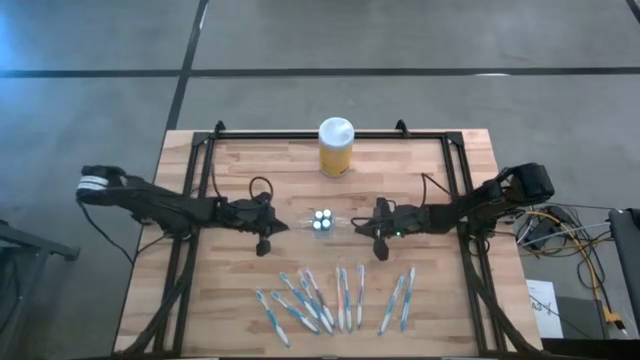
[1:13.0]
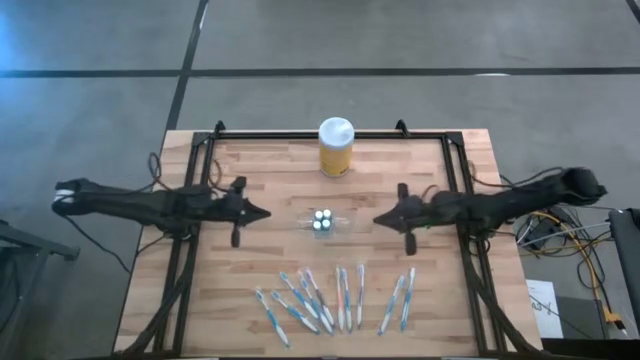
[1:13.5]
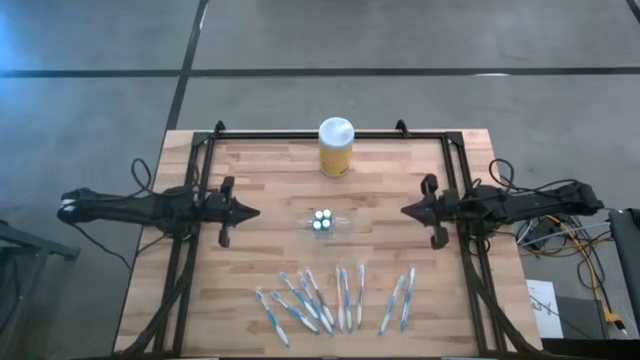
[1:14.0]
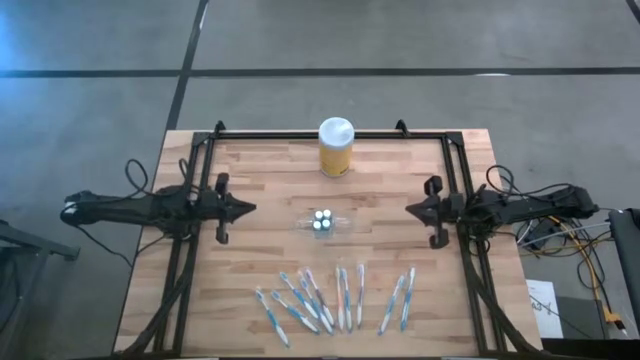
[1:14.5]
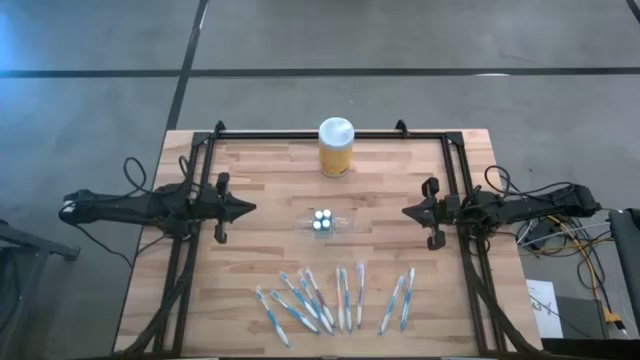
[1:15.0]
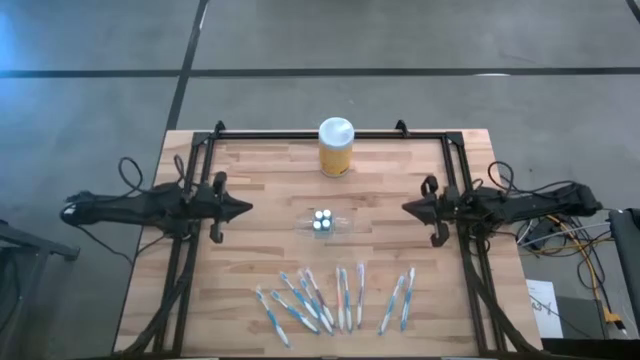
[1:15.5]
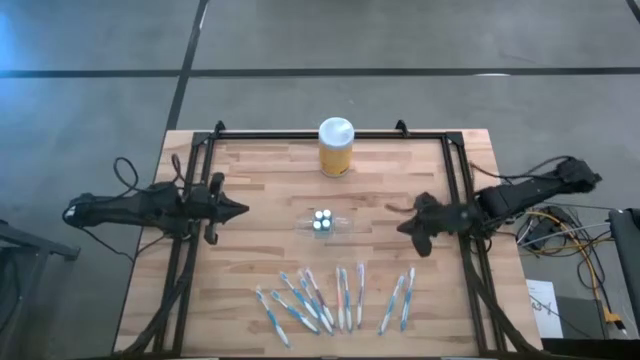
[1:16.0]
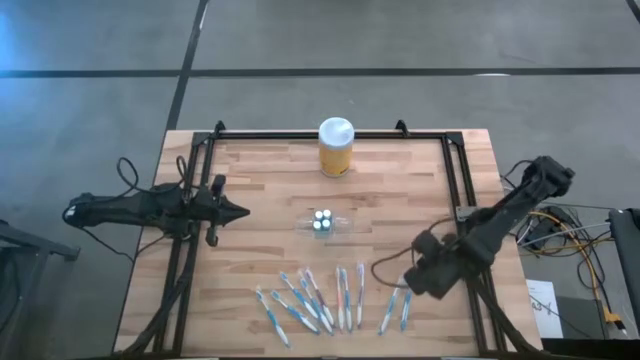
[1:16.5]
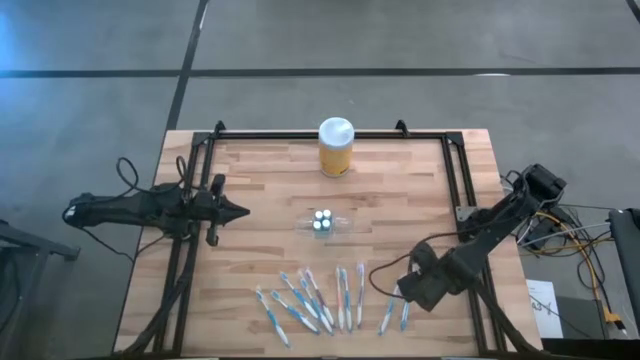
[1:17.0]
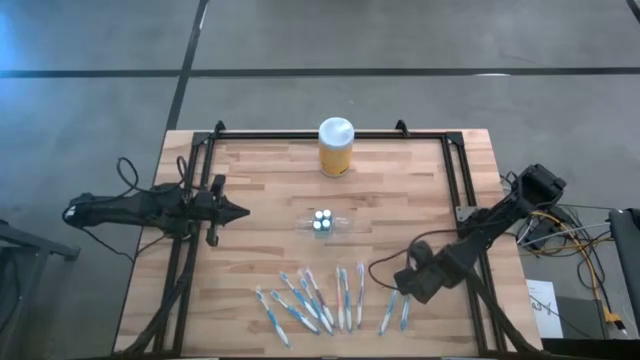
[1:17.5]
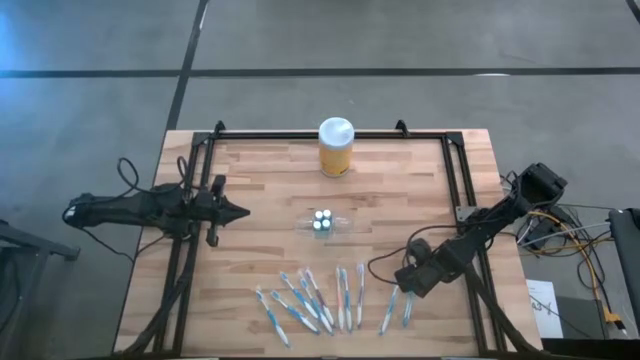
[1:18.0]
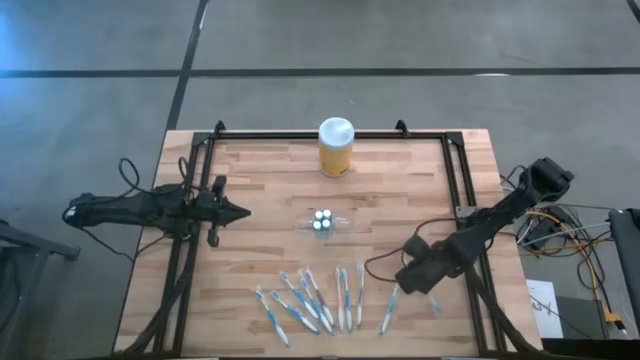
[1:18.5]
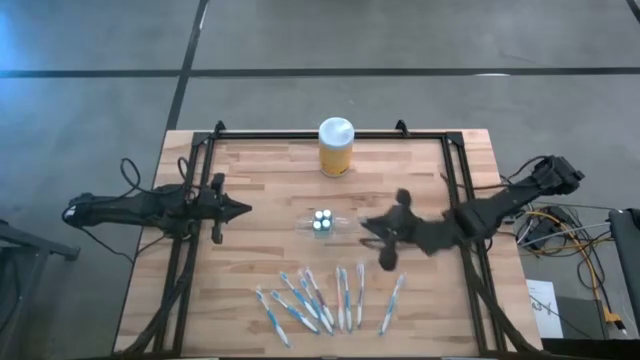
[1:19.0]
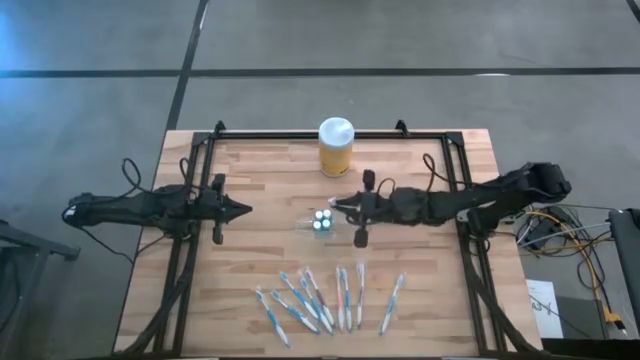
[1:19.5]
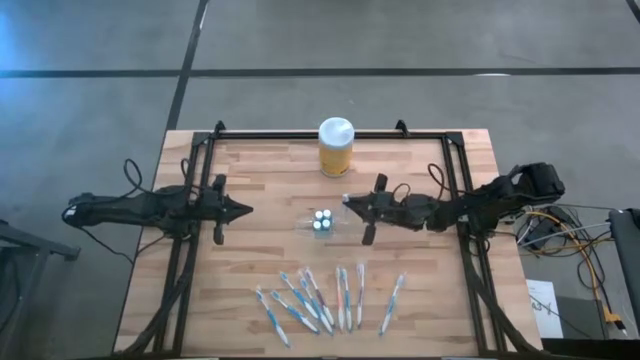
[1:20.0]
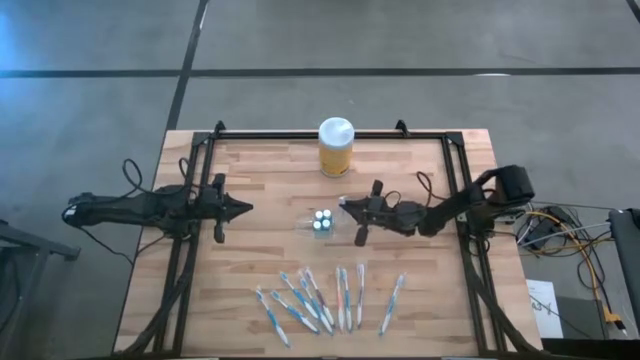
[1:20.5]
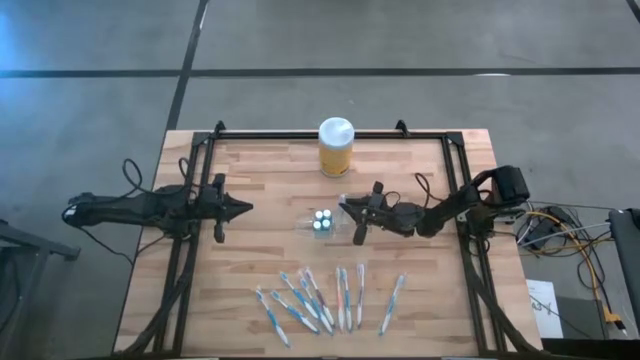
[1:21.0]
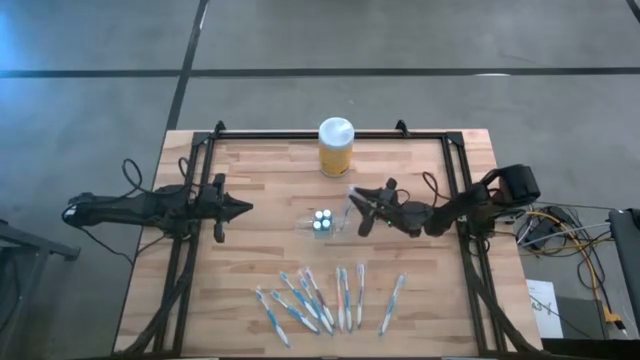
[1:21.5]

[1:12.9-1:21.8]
Task: Pick & Place toothbrushing station
Put the blue toothbrush into the transparent organizer

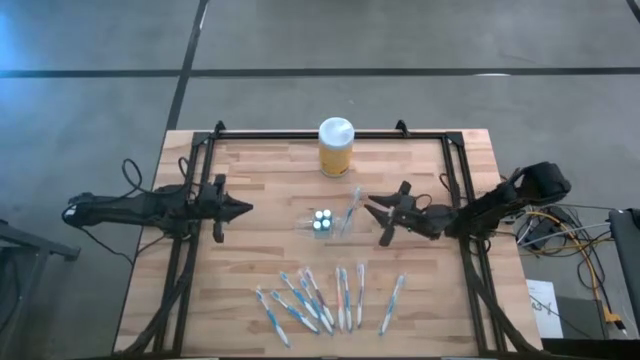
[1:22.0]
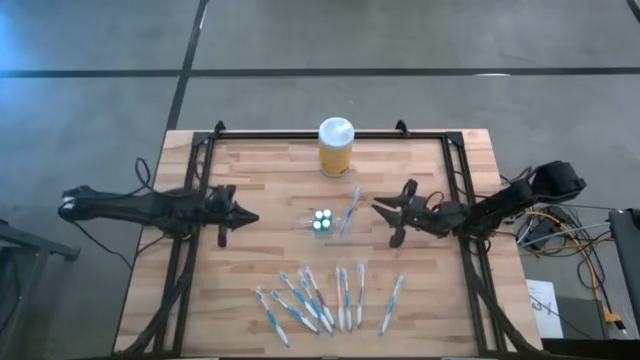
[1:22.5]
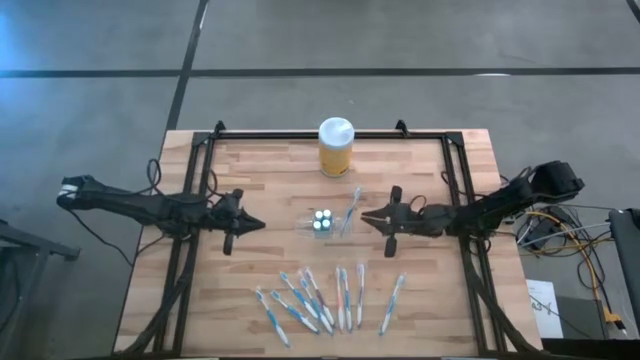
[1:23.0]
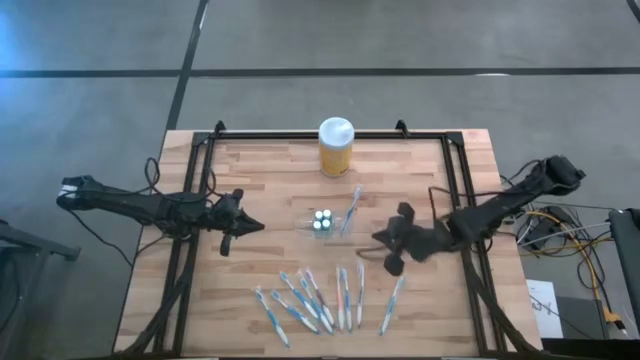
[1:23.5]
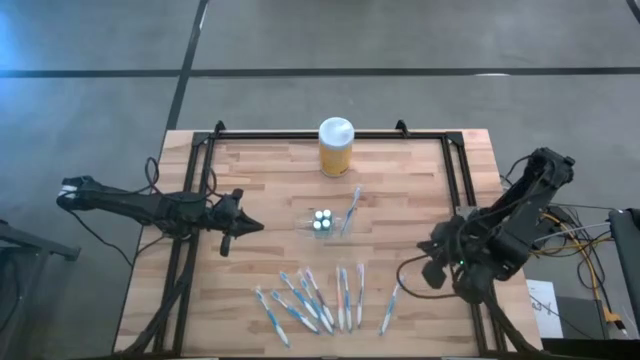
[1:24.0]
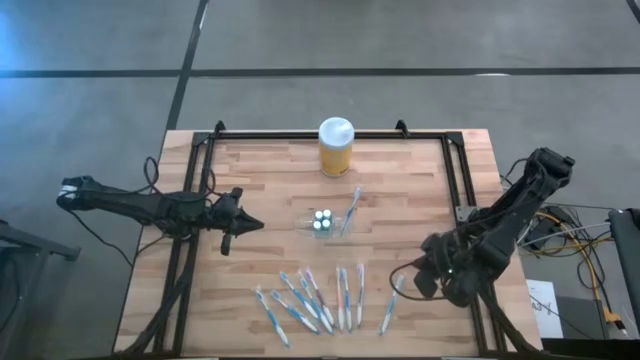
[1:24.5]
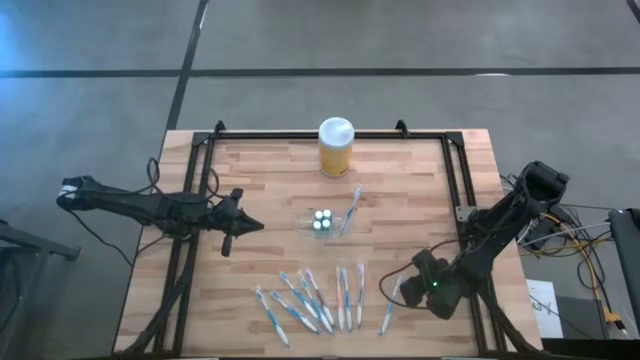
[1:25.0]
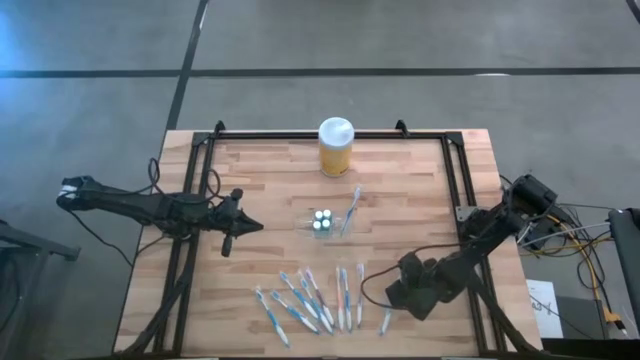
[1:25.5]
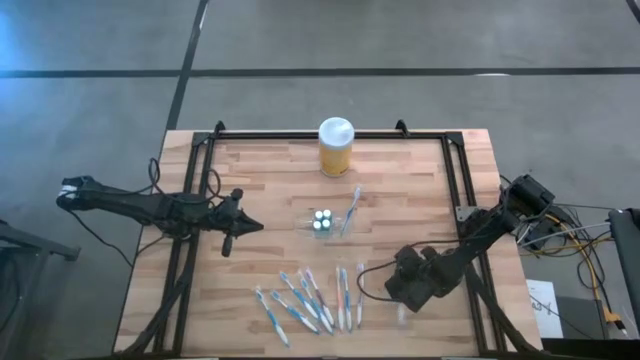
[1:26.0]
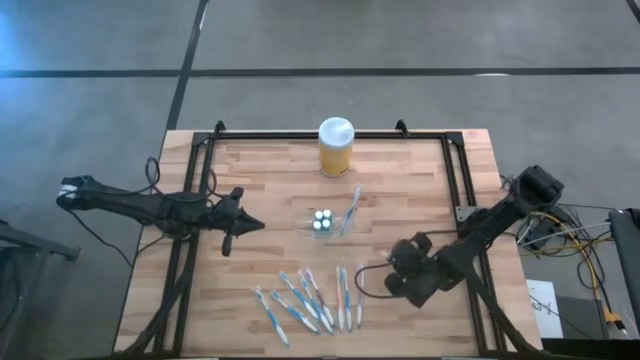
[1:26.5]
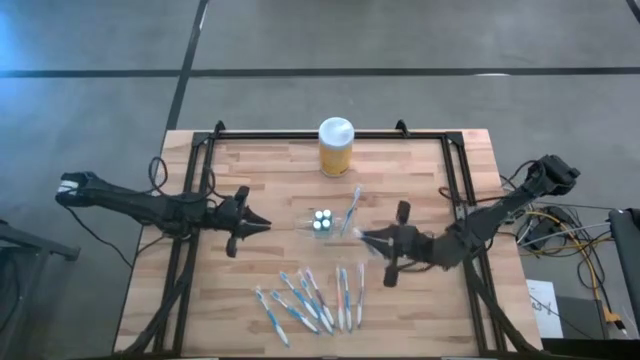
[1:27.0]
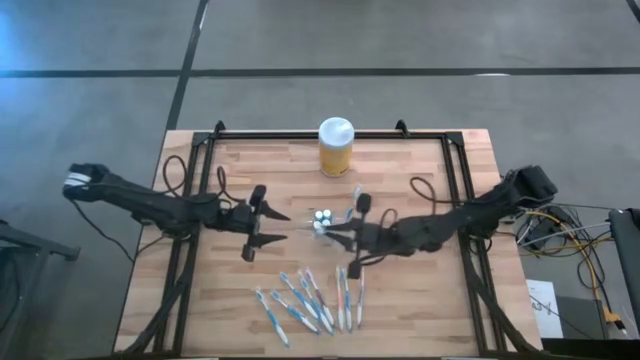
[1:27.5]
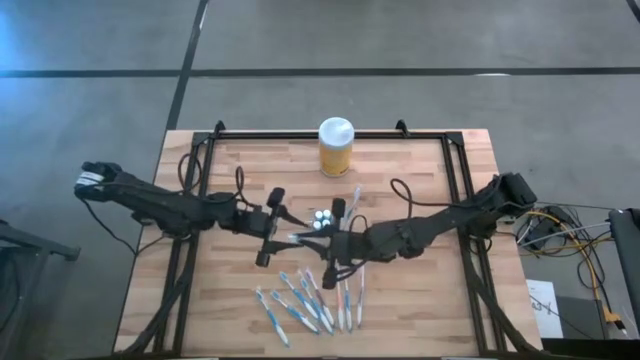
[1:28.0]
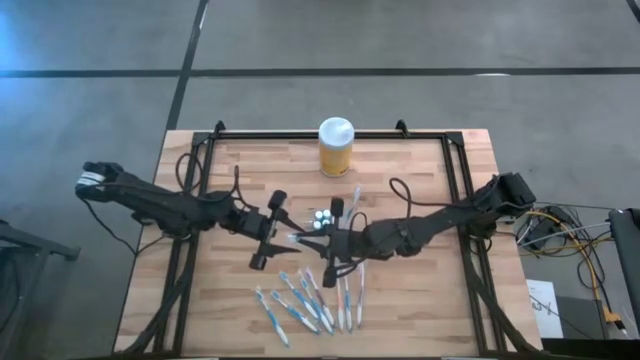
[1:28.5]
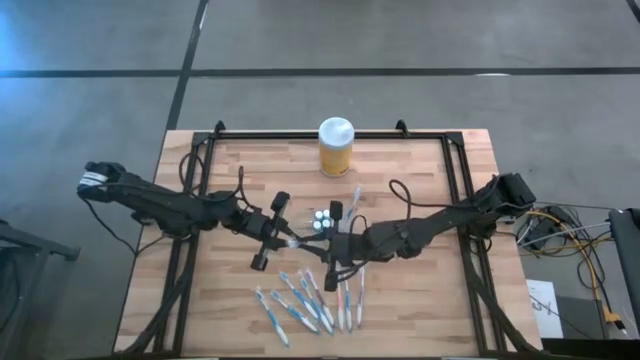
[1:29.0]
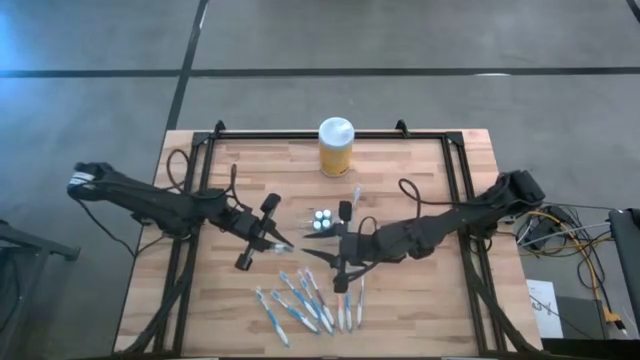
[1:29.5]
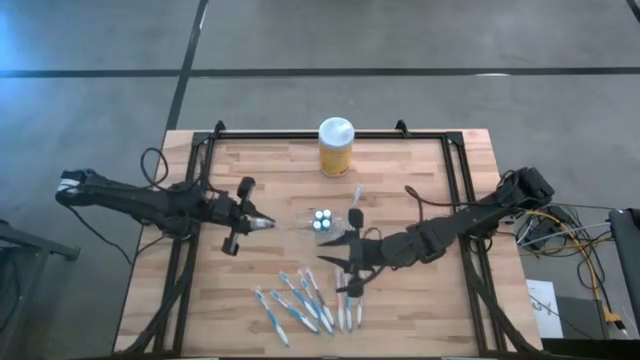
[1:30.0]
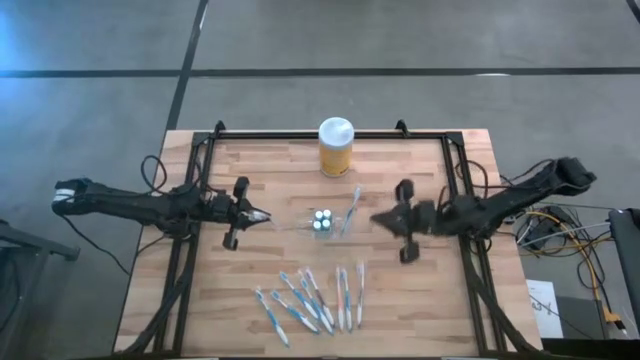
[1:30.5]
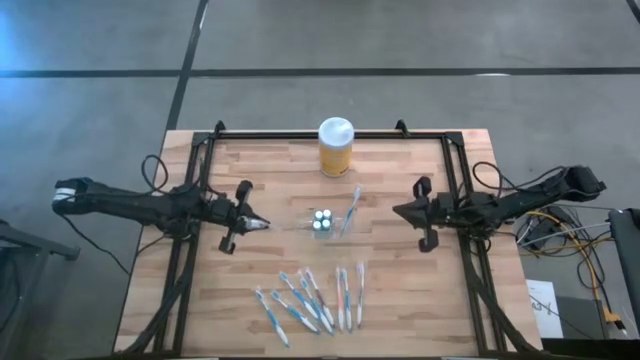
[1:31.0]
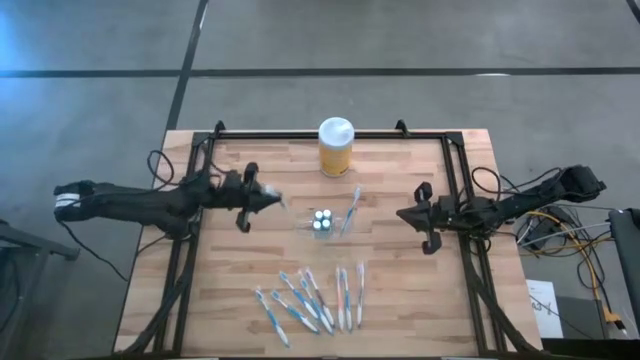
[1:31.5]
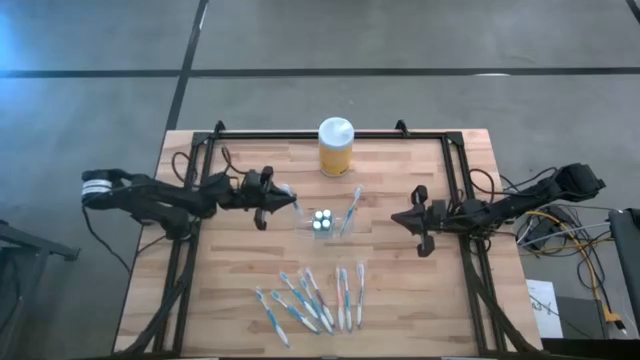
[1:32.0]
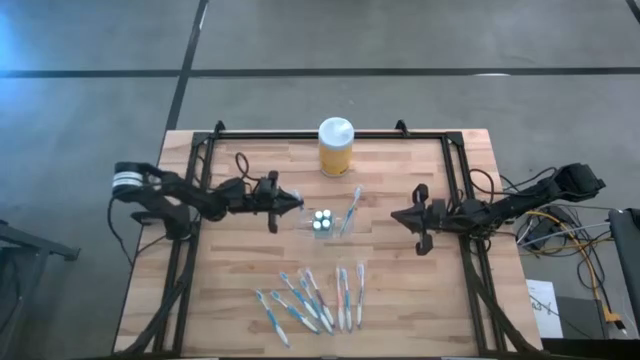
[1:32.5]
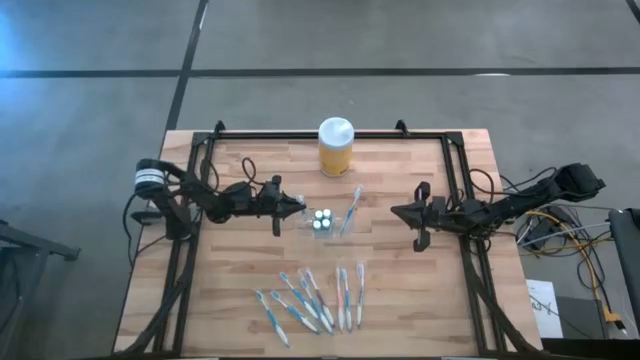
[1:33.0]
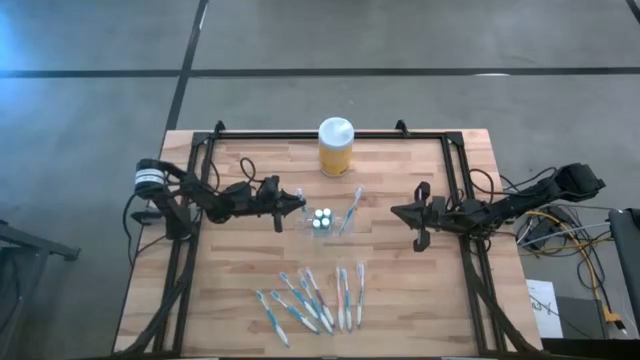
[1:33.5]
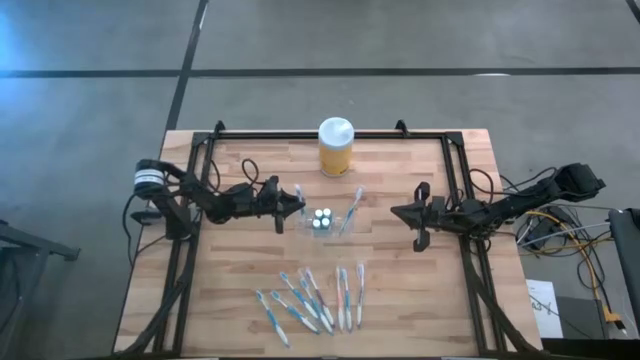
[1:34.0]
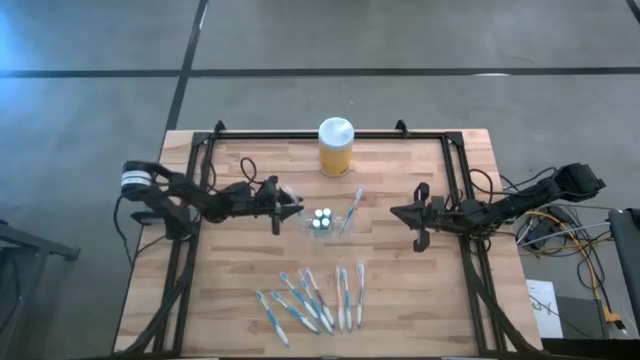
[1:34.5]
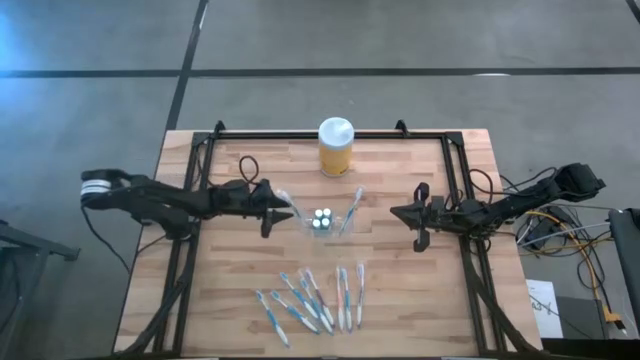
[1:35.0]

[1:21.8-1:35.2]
Put the blue toothbrush into the transparent organizer

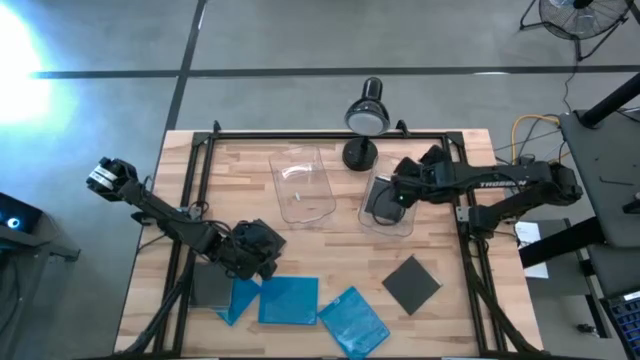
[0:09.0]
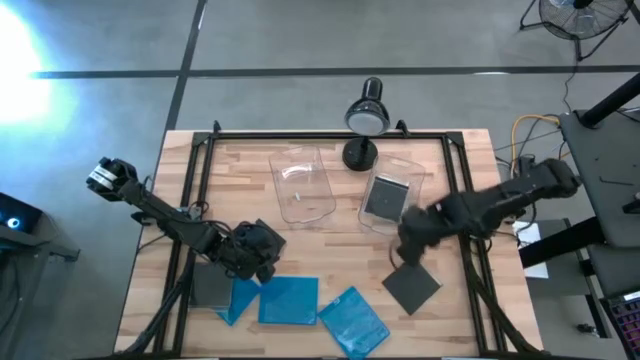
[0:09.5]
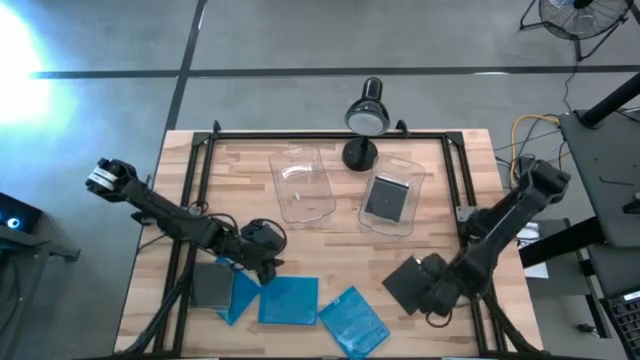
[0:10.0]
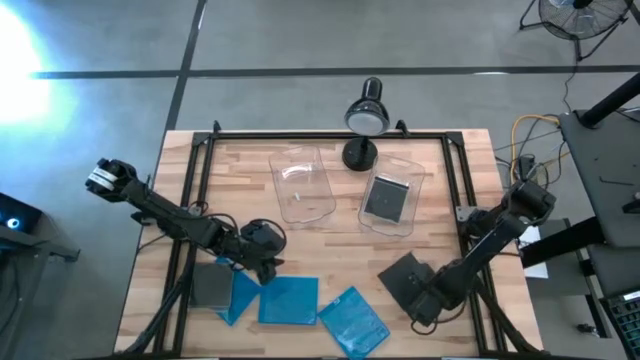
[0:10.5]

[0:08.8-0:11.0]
Task: Pick & place jewel cases by type
Move the black CD case to the center of the table
